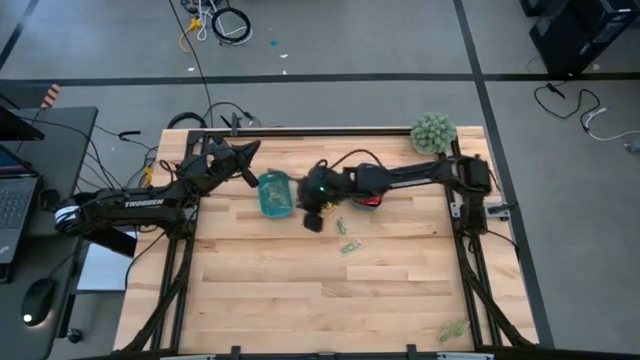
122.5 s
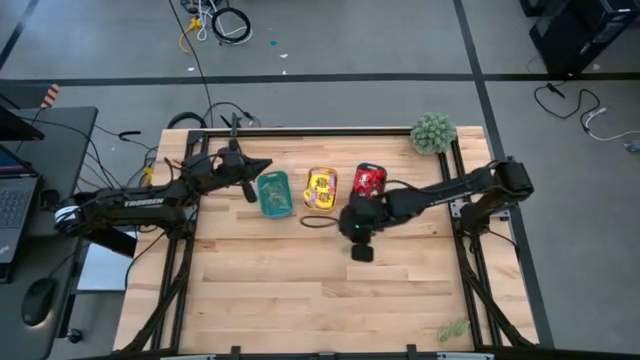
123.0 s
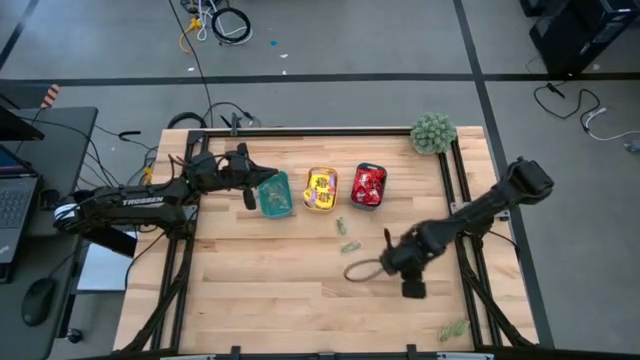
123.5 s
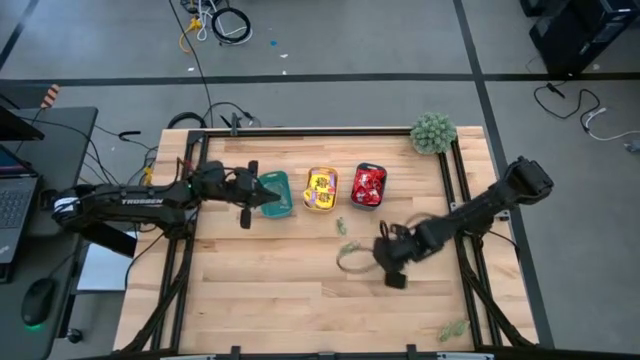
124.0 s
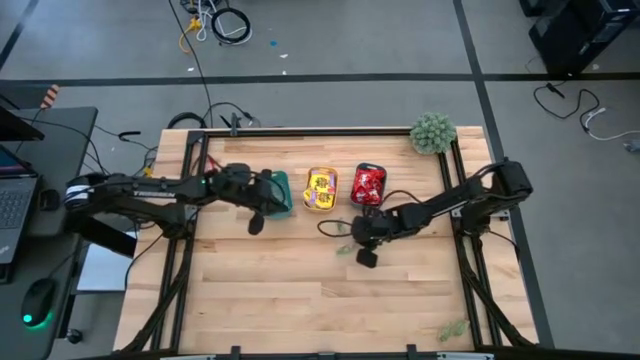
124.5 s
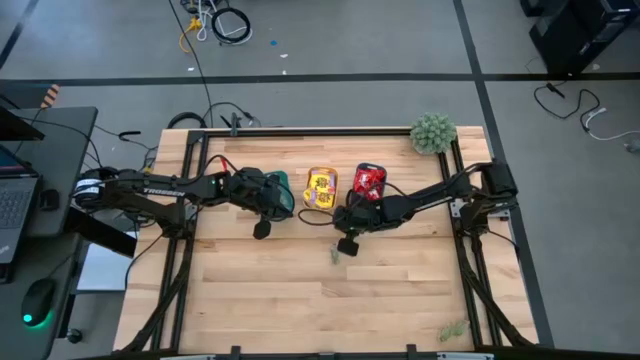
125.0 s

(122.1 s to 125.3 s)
Task: Sort candy
Adjust the green gummies

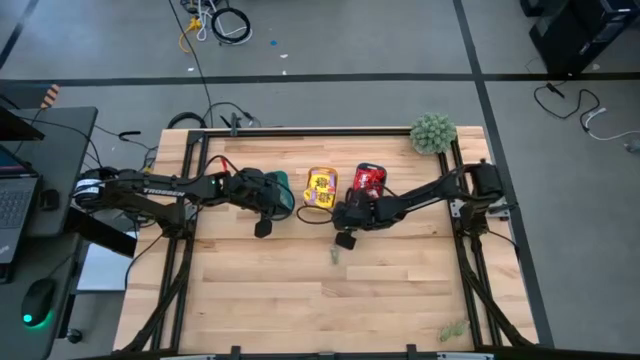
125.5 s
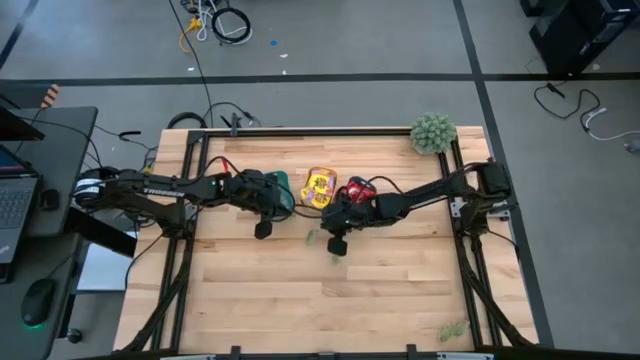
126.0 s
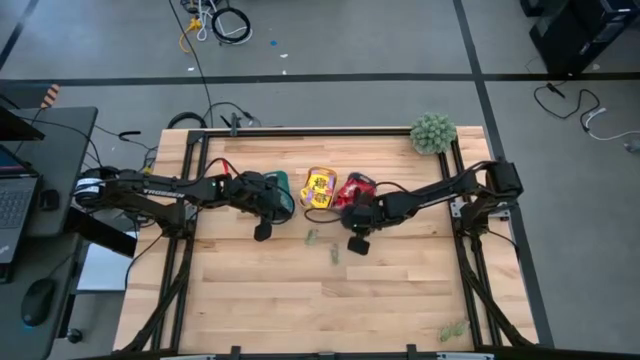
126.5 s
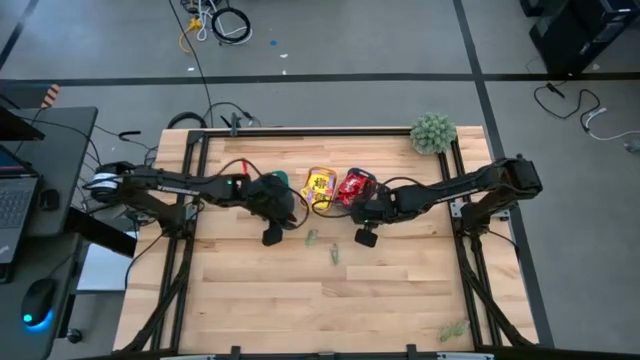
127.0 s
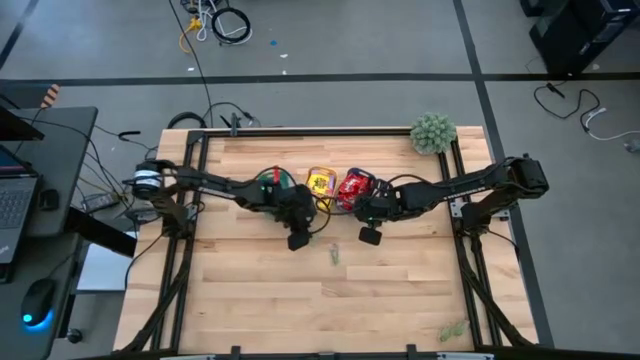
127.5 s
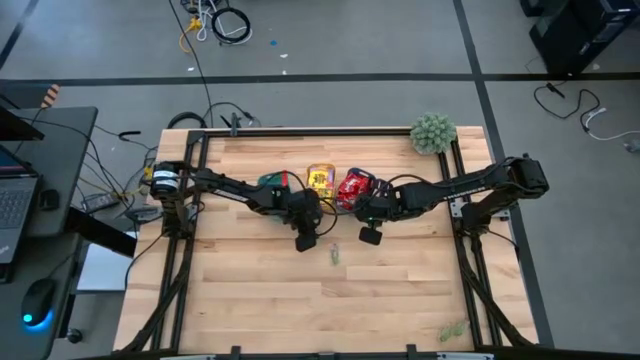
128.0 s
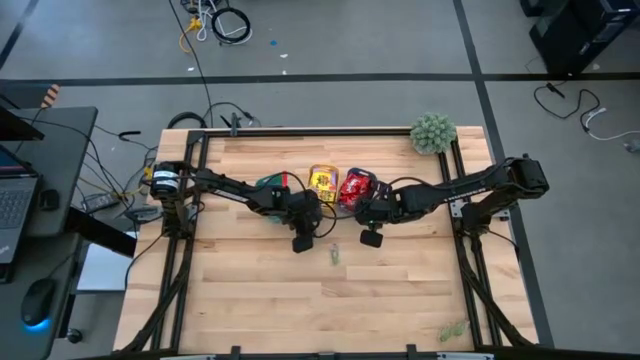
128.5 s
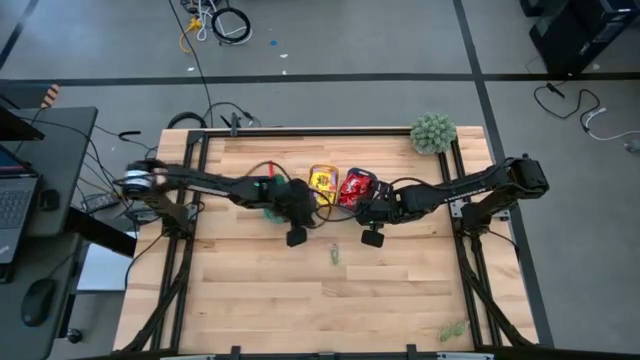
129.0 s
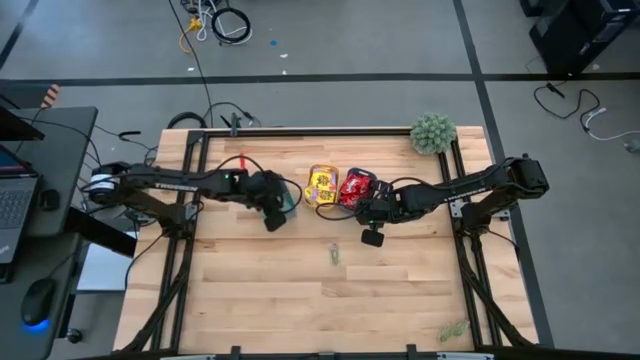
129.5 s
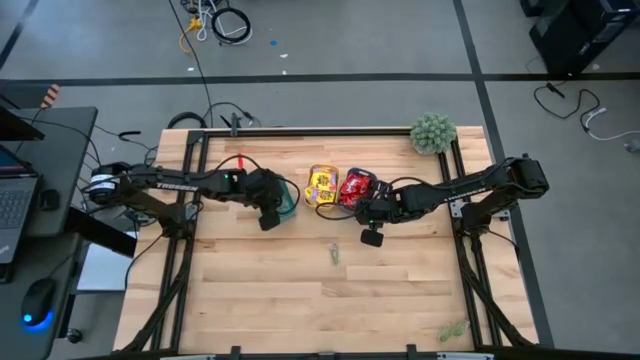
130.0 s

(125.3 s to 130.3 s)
Put the green gummy into the green bin

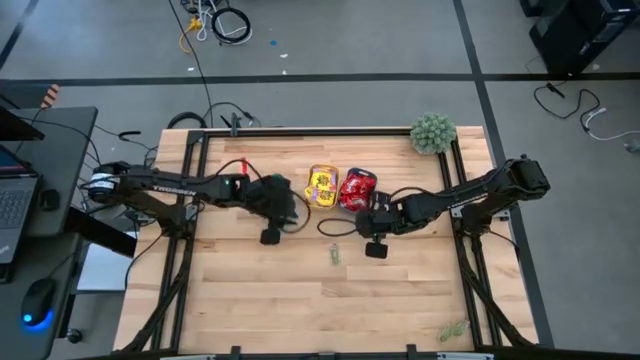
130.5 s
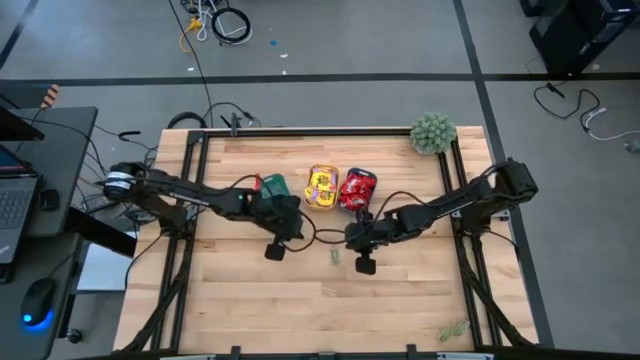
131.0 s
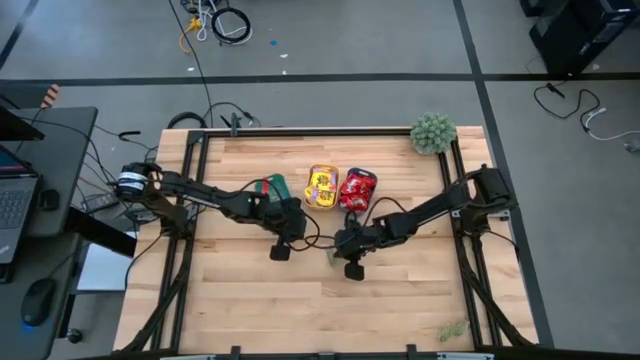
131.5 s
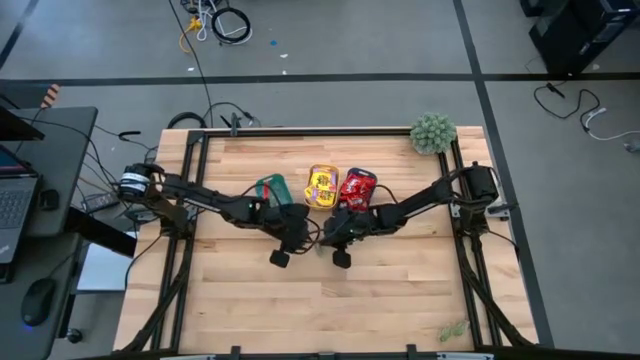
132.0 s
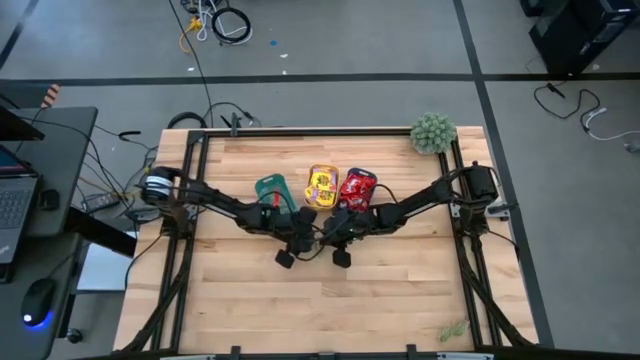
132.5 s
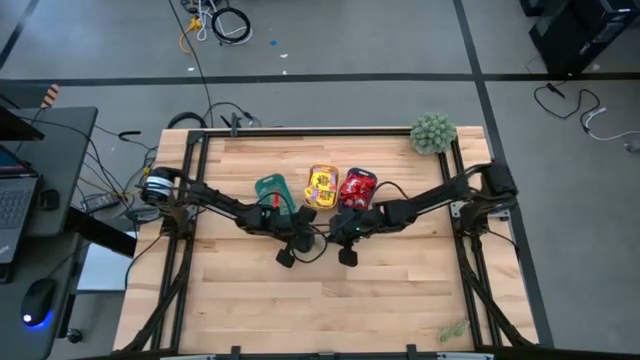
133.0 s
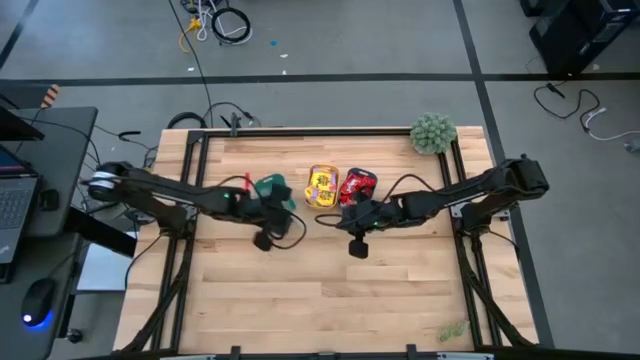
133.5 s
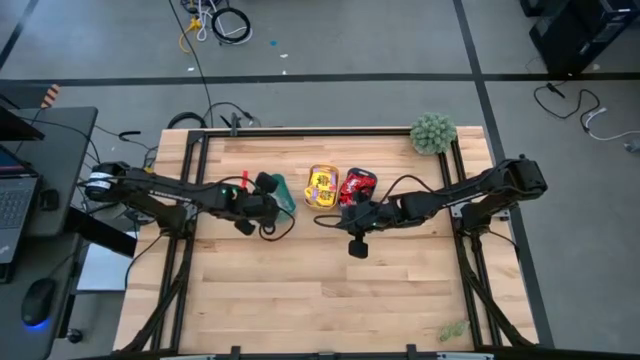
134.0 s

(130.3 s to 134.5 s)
Put the green gummy into the green bin

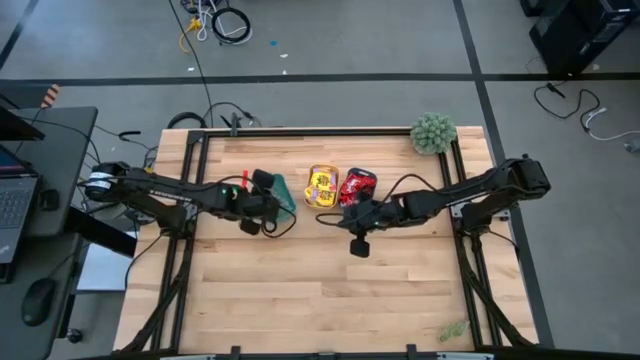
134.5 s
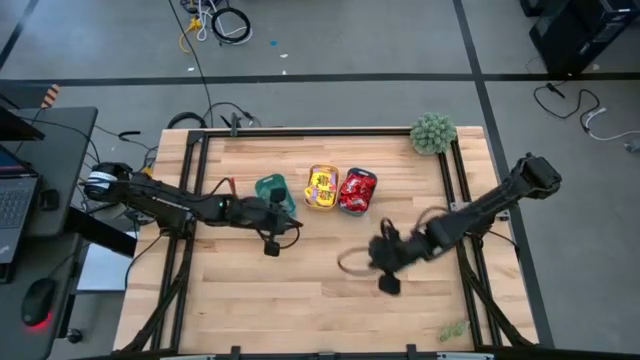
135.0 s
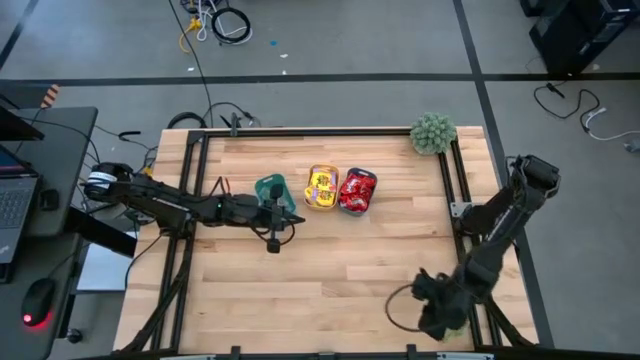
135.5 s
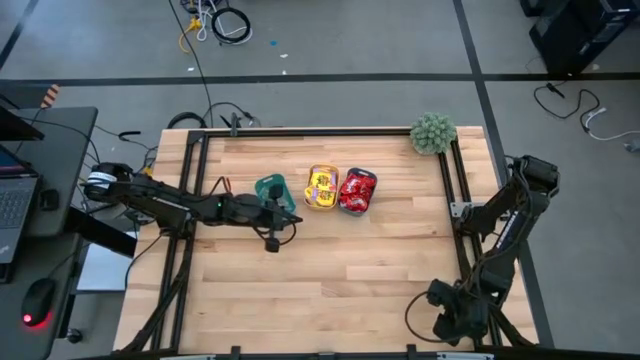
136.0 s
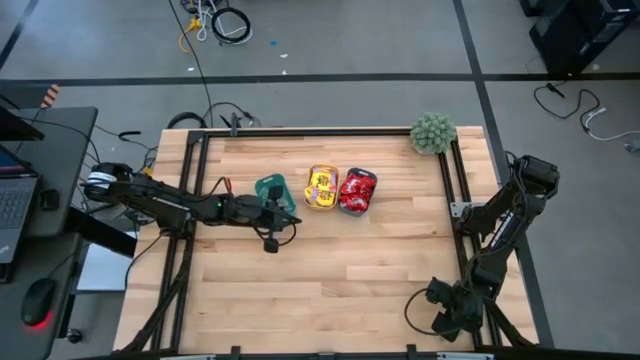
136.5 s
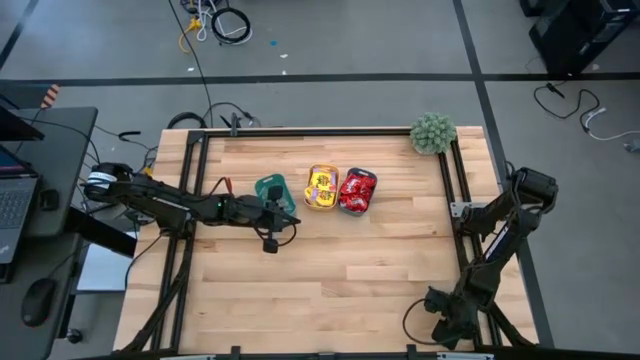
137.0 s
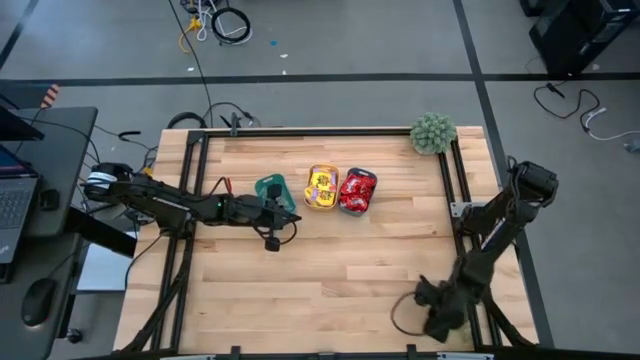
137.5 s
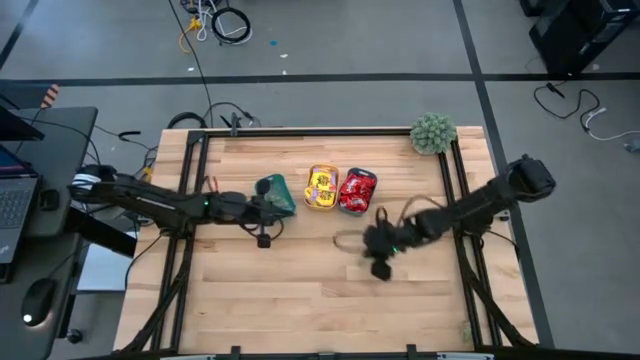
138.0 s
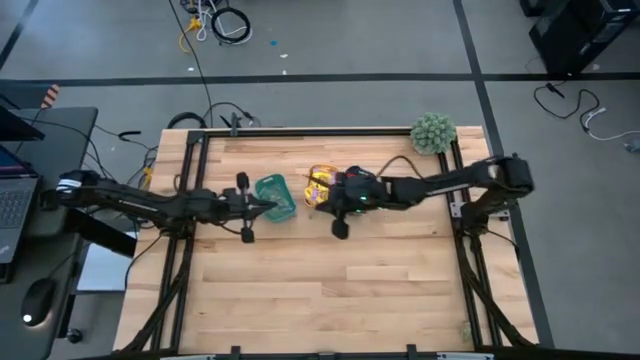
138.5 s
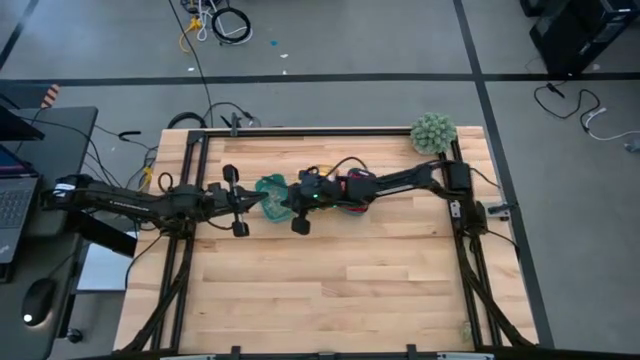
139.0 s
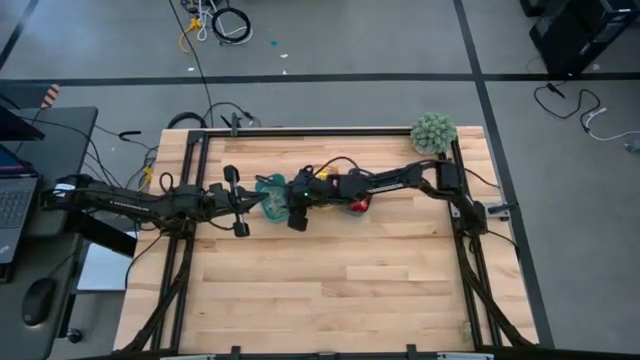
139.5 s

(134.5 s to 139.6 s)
Put the green gummy into the green bin

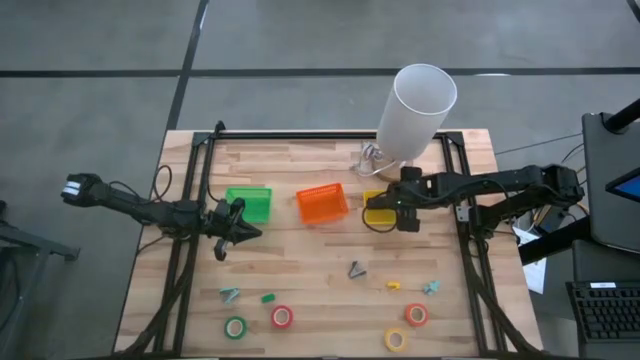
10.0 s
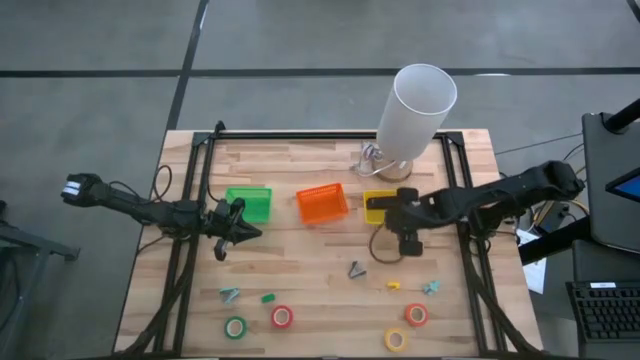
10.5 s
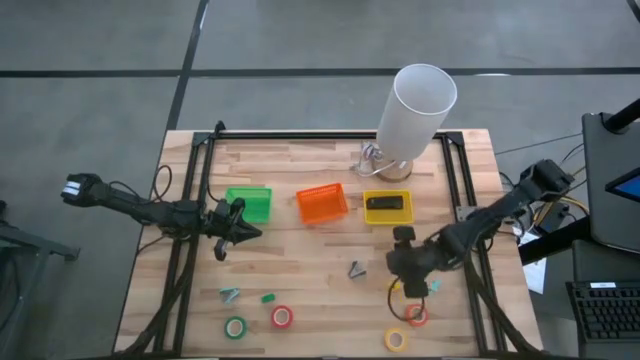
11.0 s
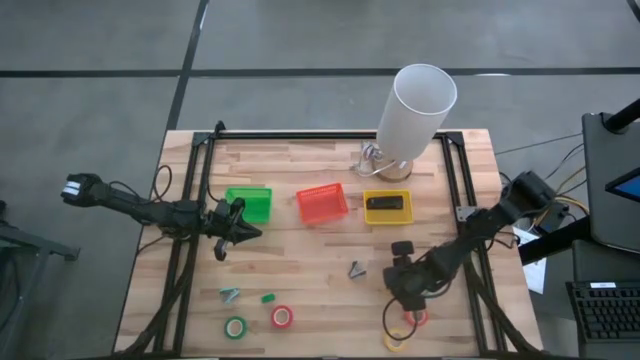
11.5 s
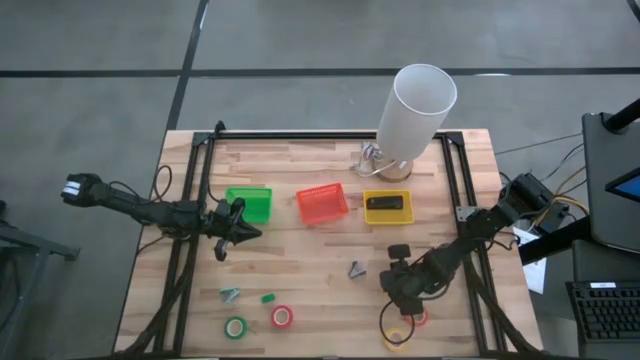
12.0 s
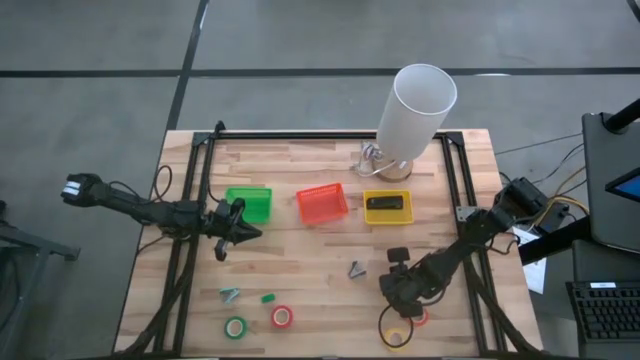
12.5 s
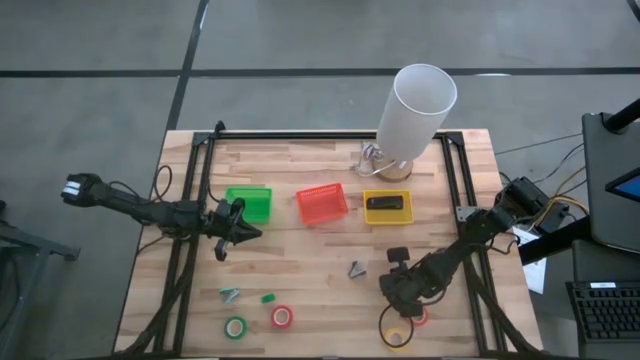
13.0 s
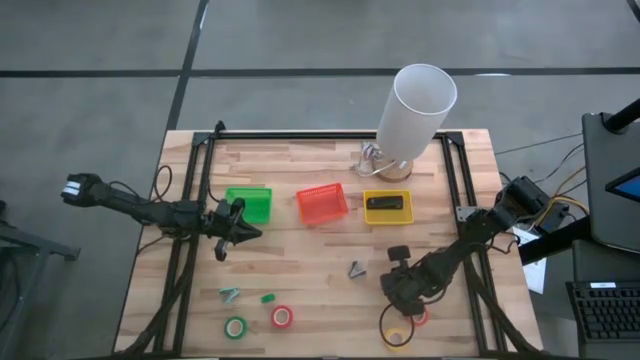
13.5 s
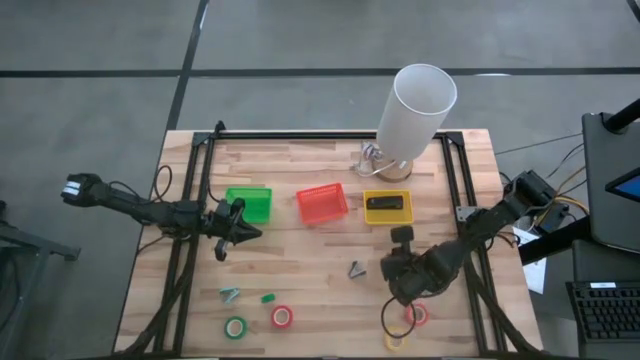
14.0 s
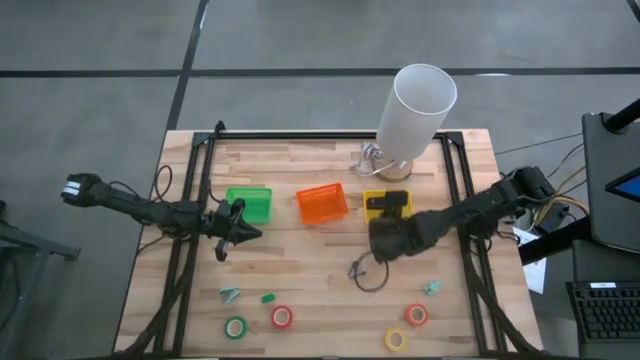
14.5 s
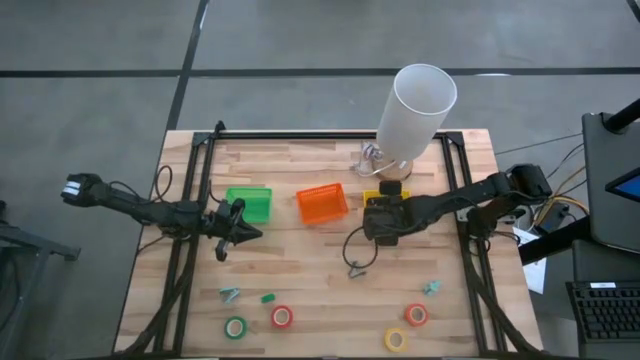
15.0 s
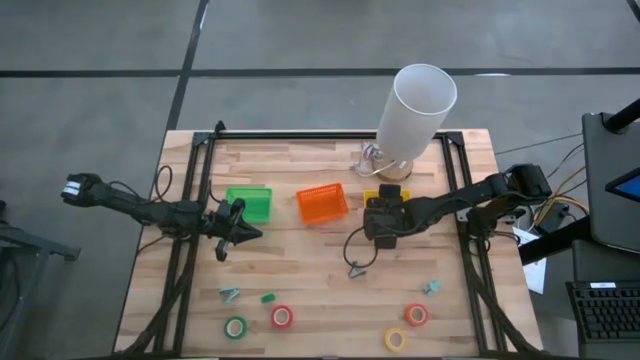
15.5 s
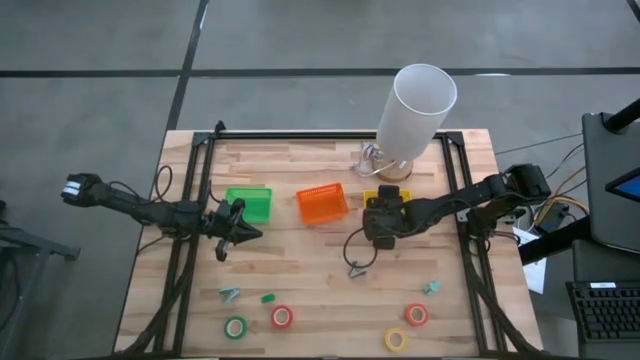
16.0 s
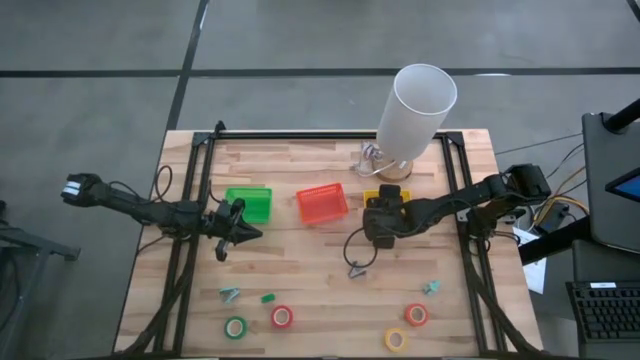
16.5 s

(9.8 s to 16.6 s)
Task: Pick and place Stapler, Stapler remover, tape
Put the yellow stapler into the yellow basket
